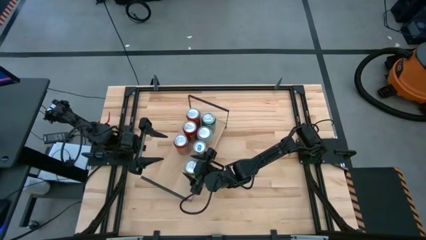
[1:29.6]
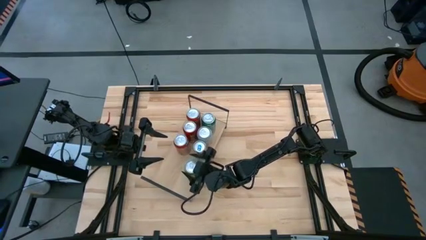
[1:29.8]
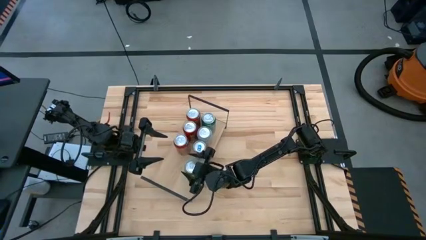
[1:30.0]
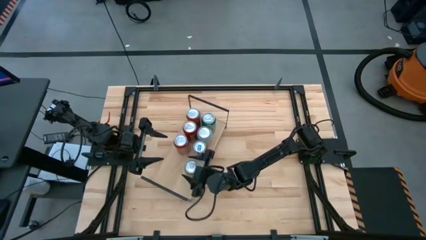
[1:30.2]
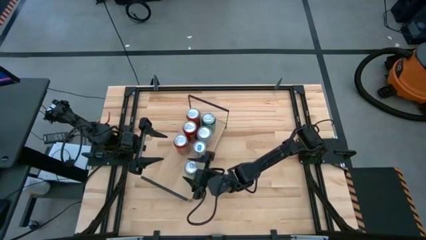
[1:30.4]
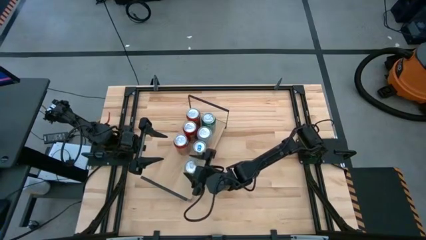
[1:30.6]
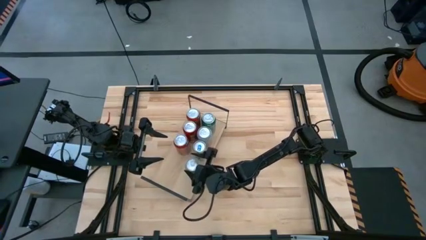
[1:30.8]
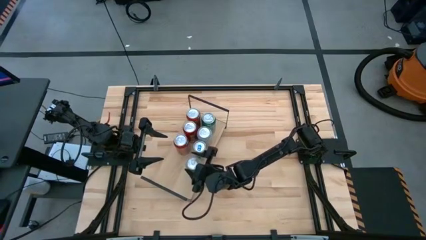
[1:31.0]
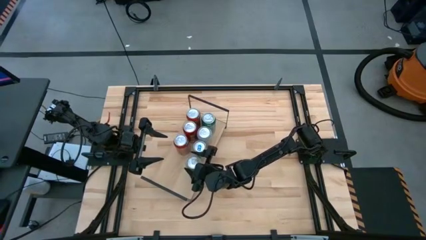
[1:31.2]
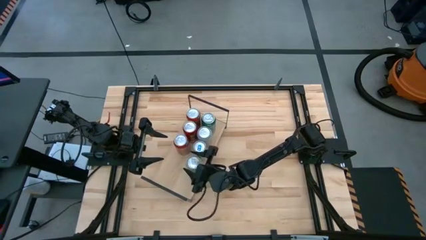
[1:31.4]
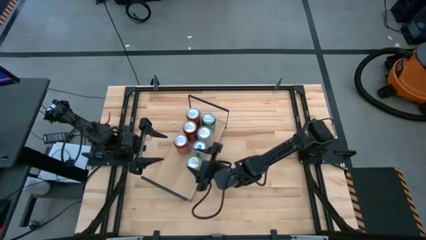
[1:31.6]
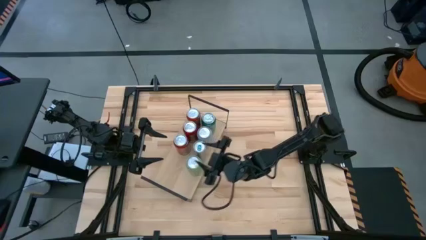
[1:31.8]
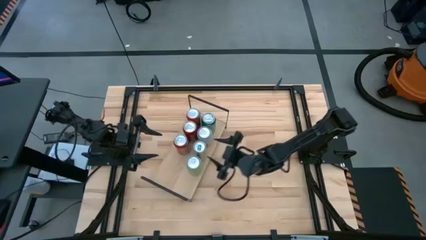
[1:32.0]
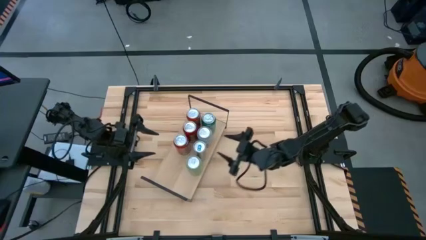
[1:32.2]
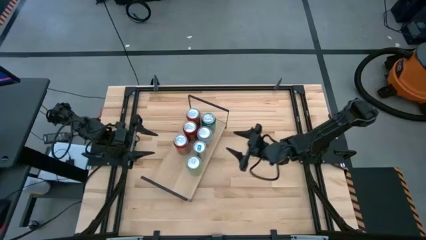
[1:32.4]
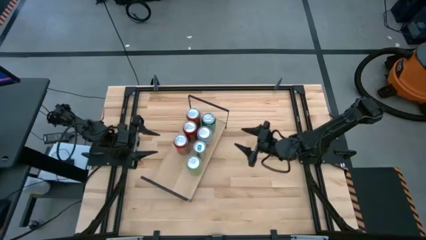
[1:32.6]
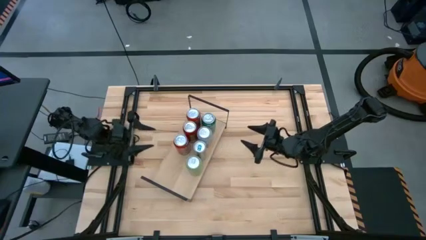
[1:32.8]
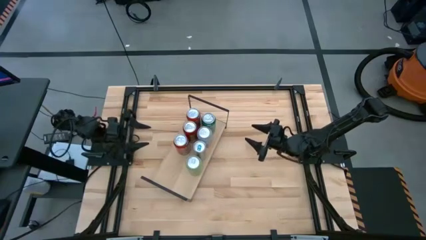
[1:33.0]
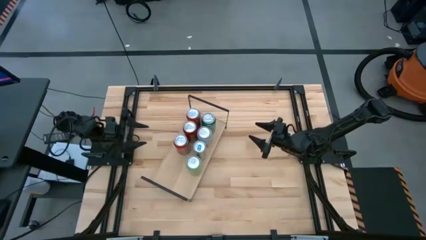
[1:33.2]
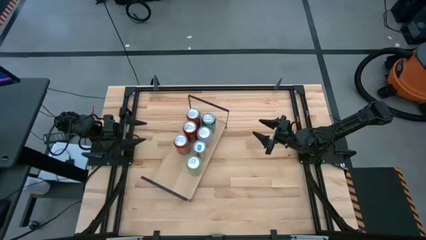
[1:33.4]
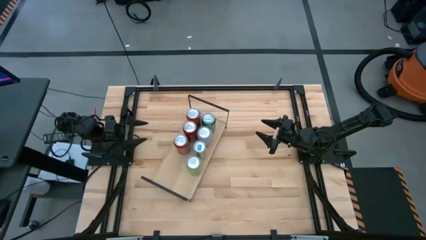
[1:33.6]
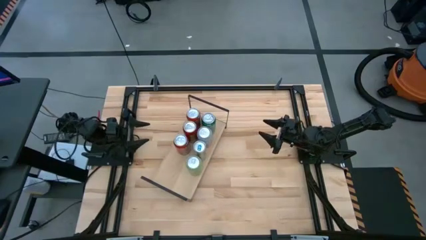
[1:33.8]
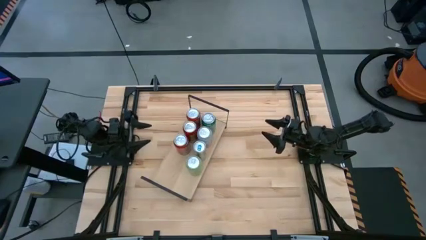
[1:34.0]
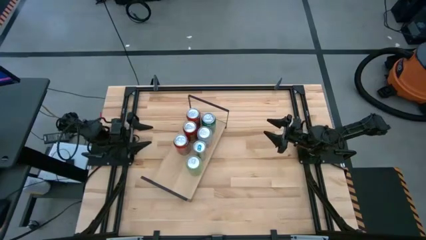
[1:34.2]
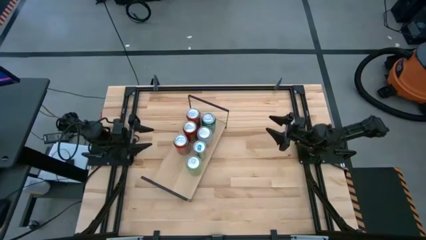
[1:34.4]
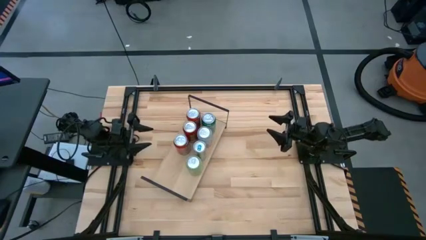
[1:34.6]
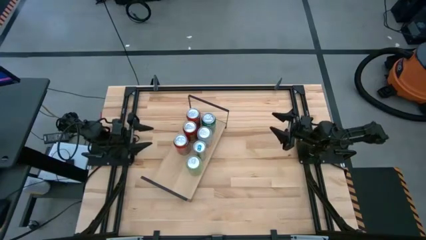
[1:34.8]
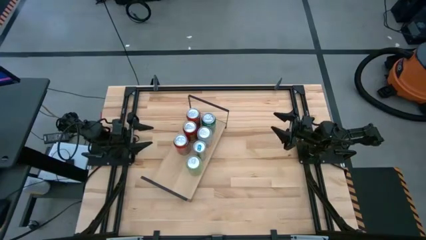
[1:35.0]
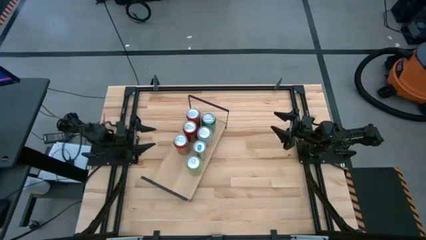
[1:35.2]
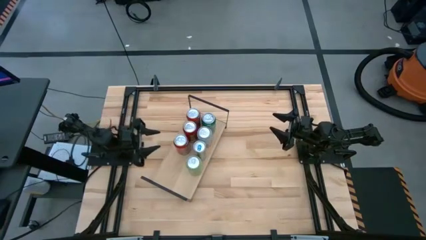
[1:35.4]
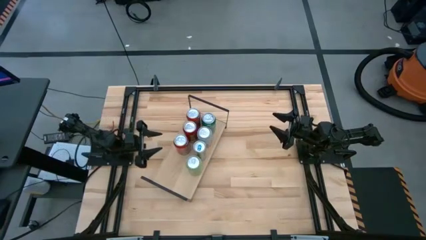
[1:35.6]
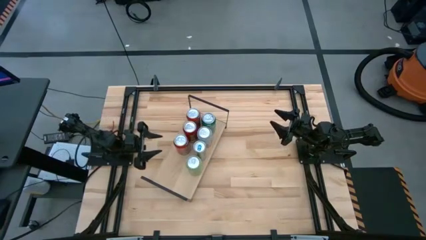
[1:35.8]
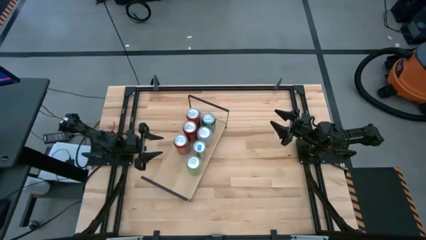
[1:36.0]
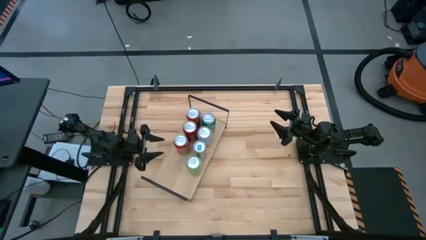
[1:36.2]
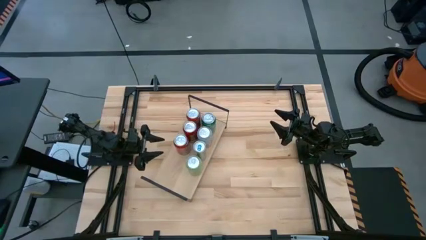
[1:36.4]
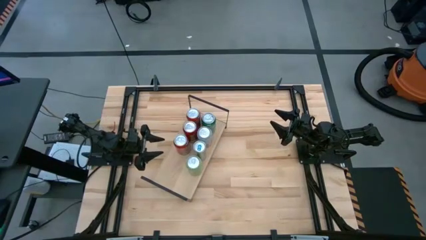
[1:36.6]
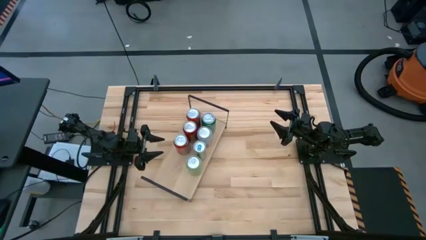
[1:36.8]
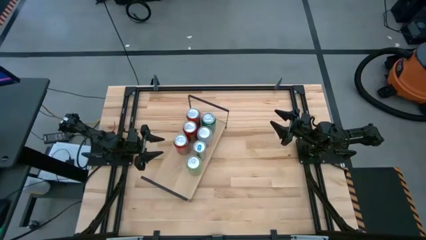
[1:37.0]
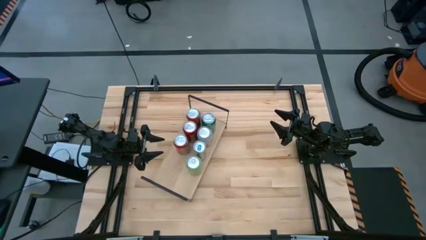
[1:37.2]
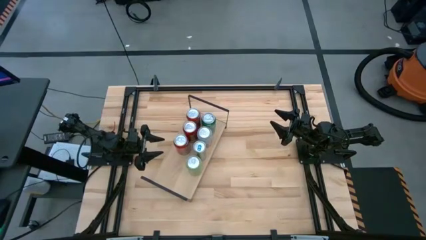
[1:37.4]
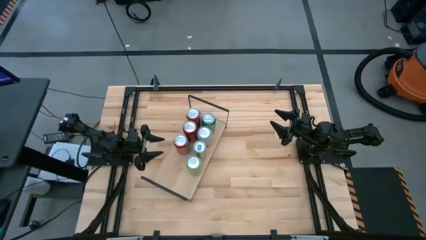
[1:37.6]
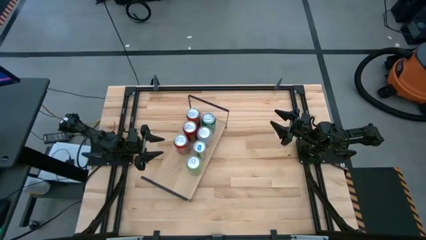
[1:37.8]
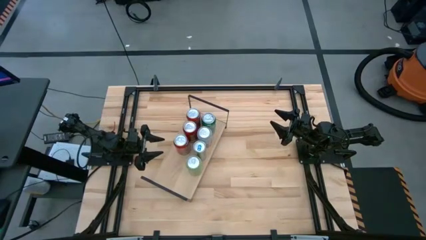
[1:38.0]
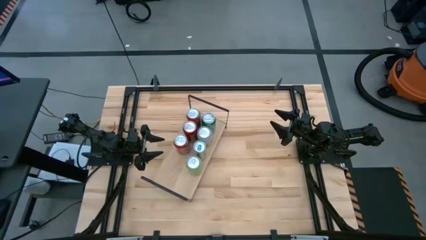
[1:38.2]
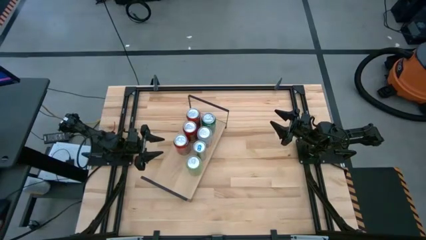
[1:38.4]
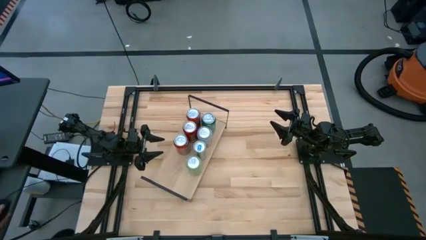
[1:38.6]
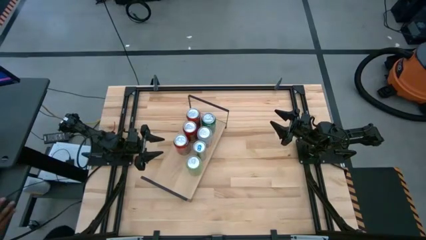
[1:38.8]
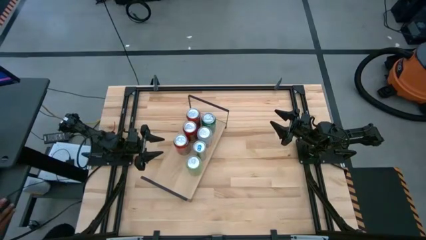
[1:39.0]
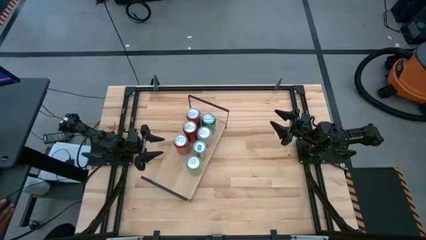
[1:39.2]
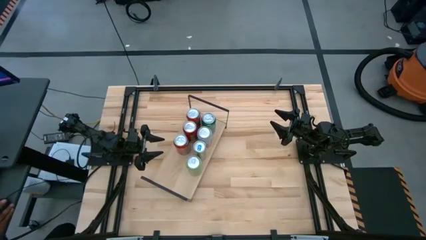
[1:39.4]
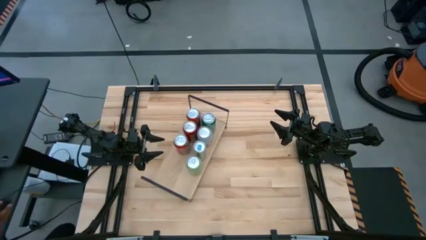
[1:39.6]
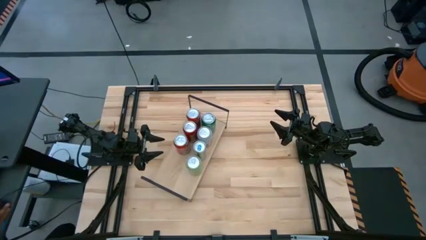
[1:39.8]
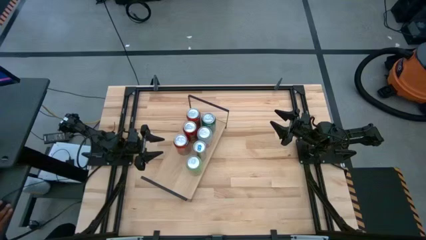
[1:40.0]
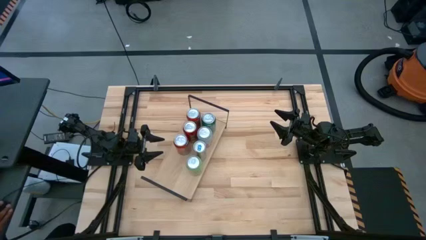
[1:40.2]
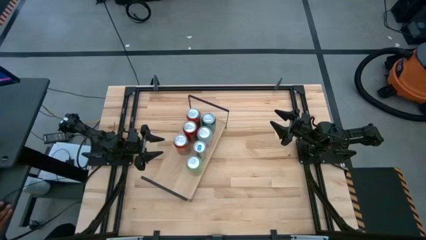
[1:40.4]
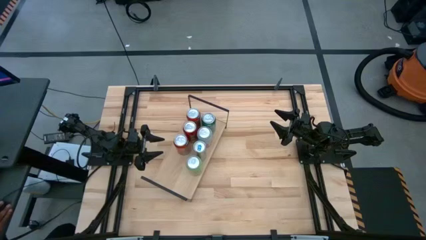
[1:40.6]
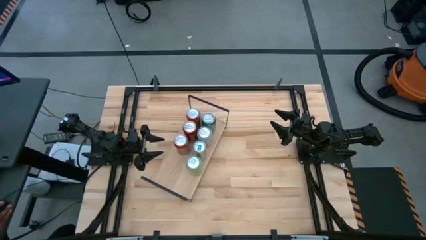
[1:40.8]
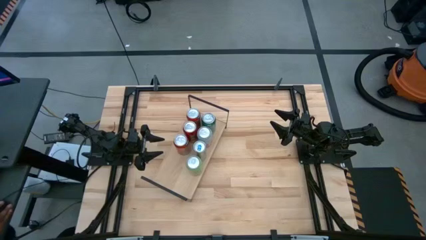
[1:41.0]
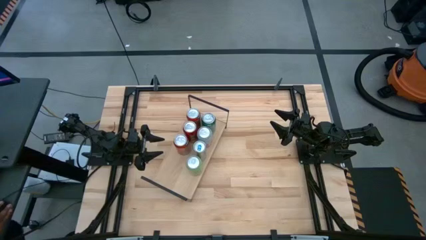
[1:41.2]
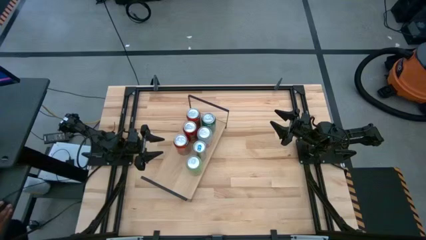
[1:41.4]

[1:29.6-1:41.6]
Task: Place canned beverage on shelf
Return to Home Position
